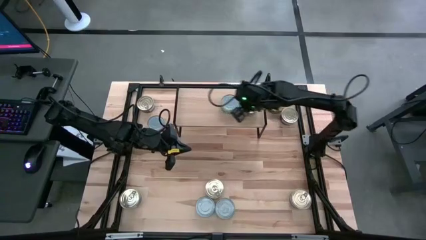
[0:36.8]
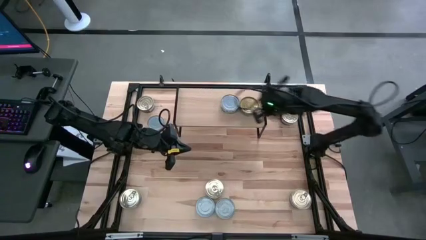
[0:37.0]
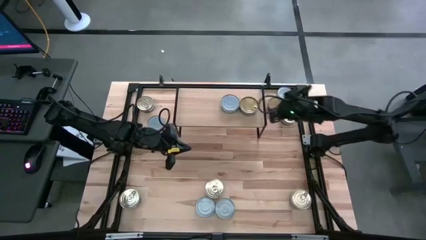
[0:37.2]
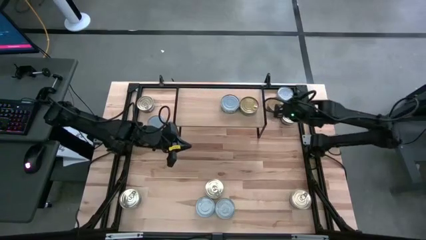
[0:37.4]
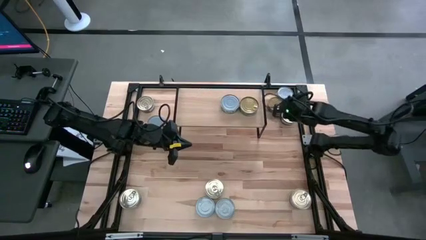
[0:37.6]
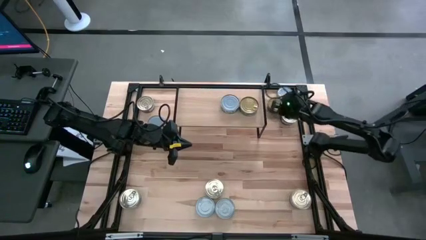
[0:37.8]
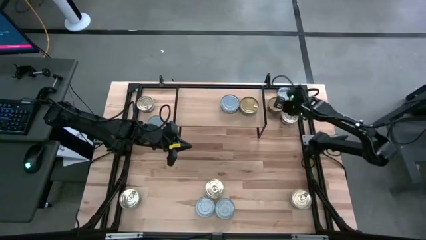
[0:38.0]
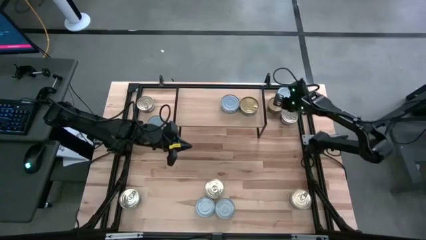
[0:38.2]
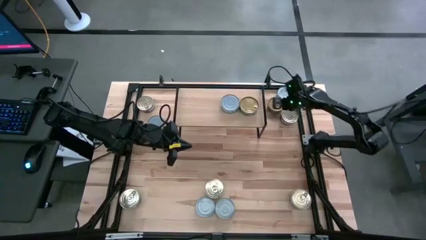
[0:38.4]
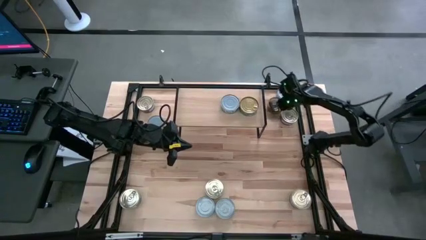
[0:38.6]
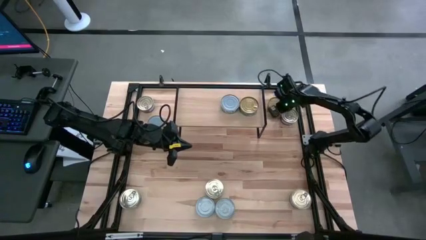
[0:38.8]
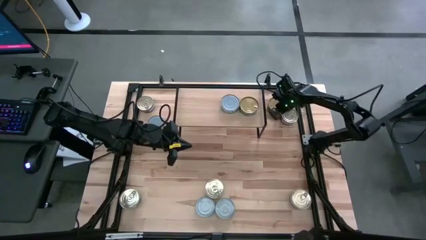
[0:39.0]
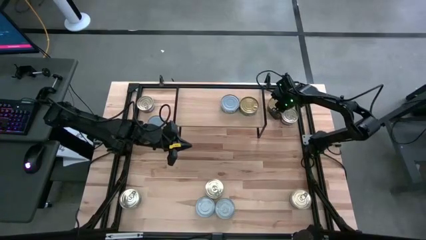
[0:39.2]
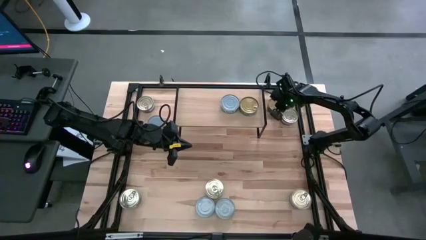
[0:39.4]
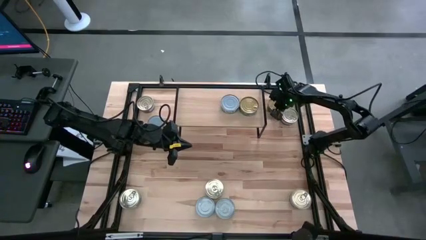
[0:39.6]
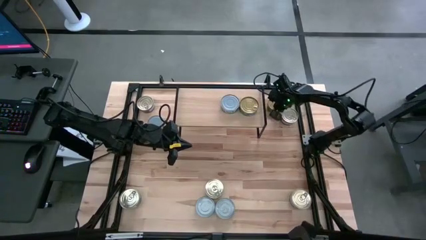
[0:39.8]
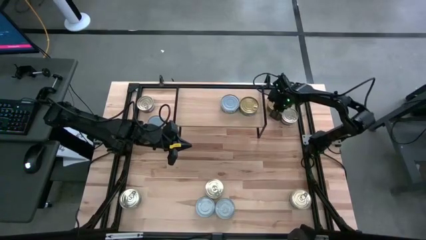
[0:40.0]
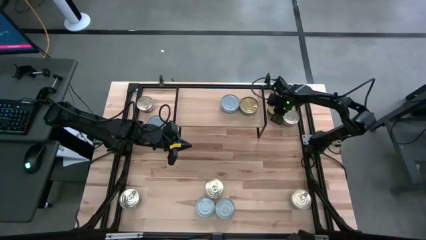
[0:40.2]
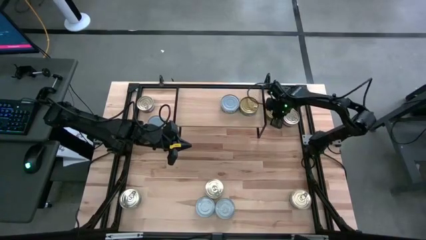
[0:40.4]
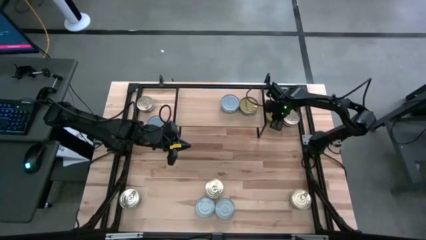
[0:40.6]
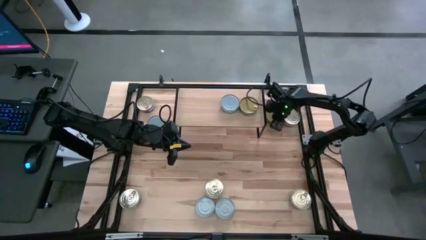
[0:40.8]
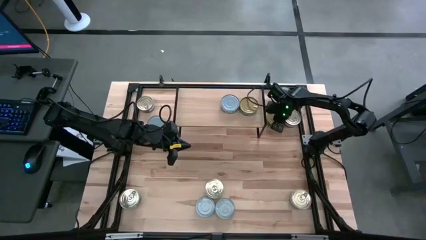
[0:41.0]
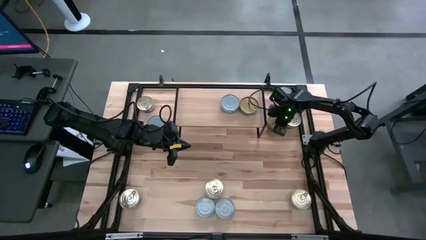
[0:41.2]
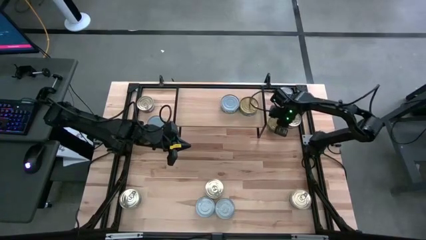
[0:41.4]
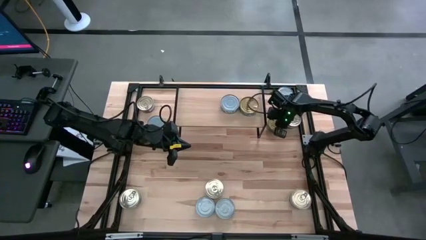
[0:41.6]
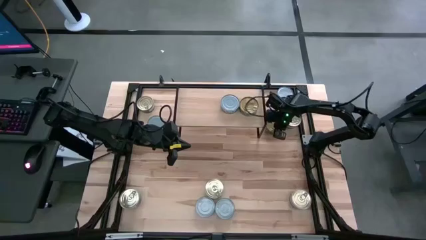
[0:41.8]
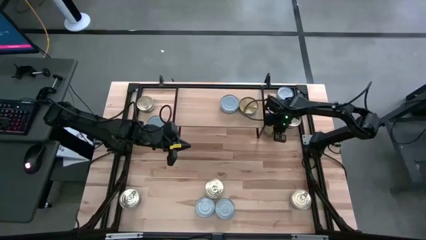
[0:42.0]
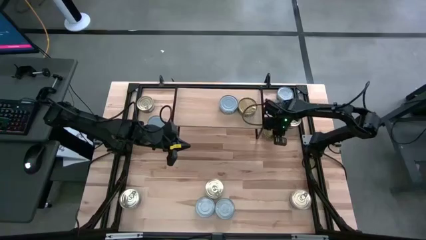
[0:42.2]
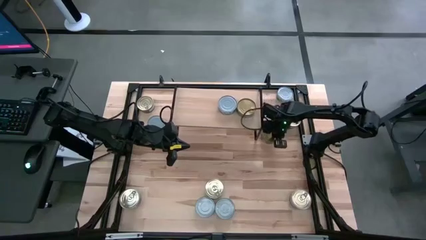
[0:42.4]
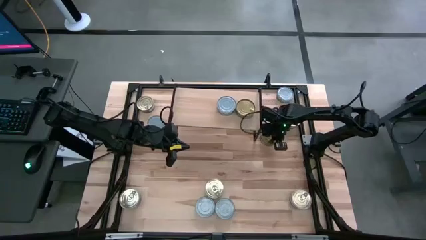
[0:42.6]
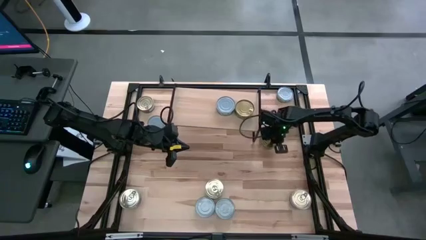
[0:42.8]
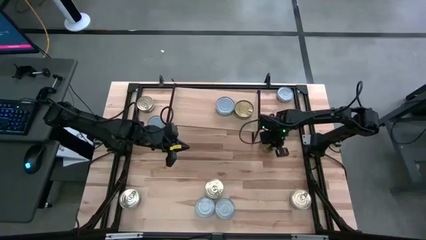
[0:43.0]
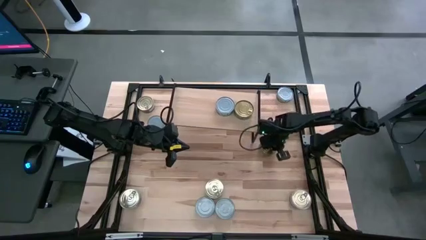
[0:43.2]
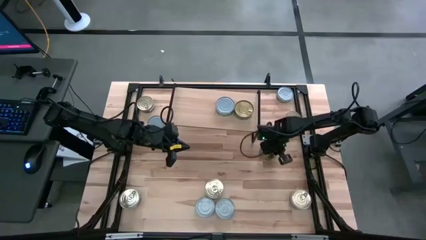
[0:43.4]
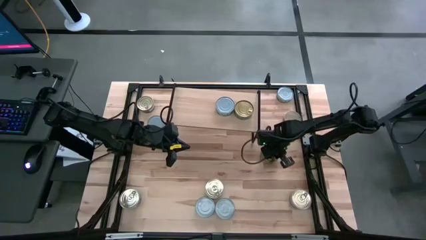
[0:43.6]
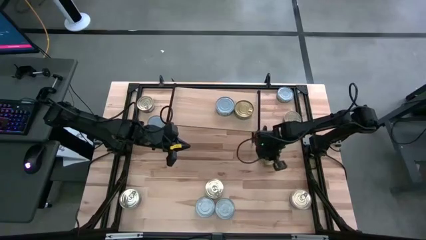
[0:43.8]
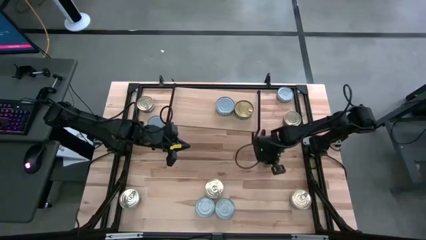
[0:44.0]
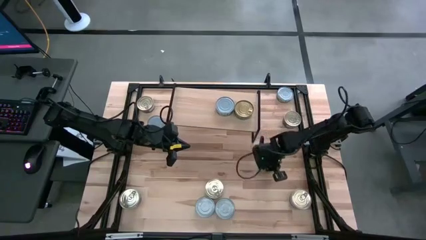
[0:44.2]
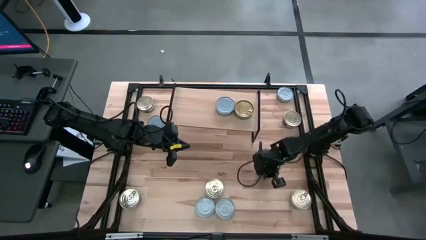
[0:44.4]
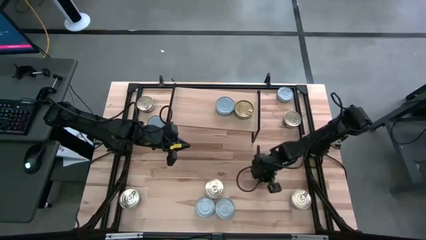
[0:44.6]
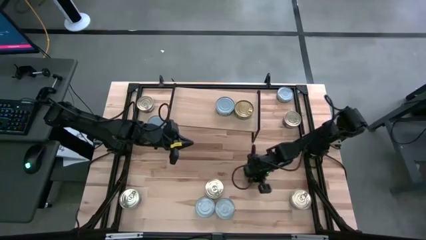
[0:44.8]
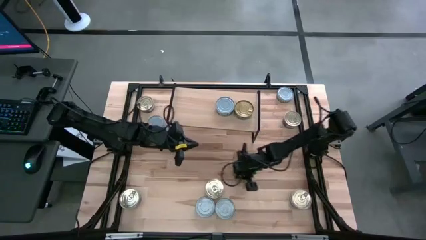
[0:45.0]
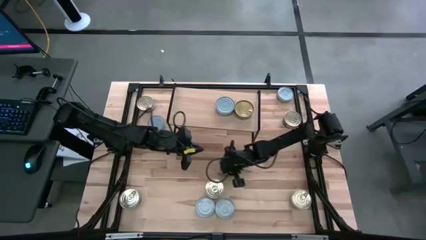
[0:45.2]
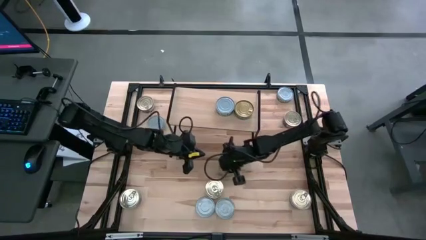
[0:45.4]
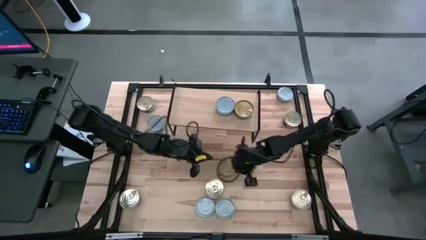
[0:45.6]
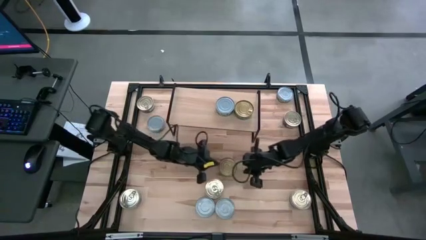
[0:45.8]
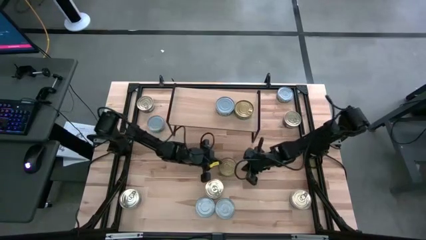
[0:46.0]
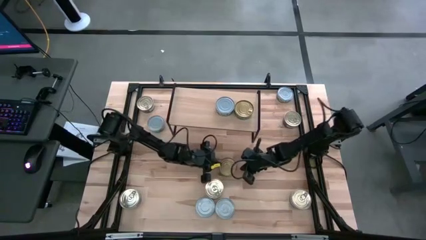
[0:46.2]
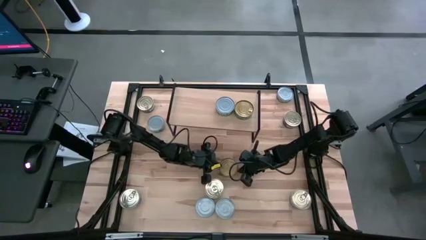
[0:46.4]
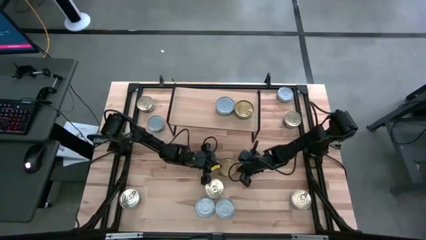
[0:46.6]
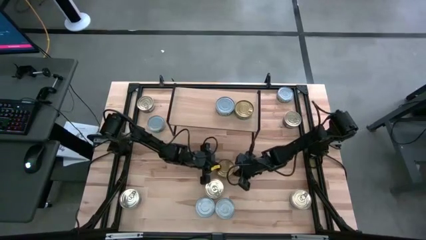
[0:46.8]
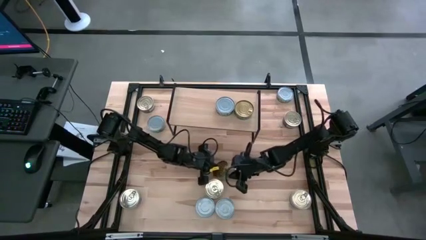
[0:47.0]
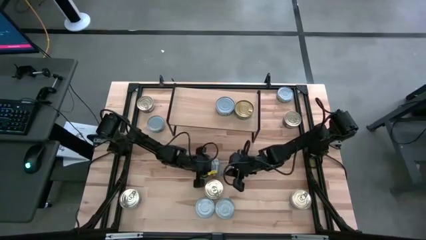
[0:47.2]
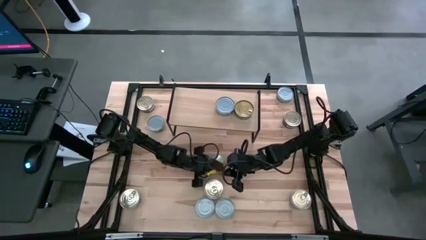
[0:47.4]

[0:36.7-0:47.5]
Task: Stack canned seafood by type on shelf
Stack the green tuna can on top of the green tuna can on the shelf

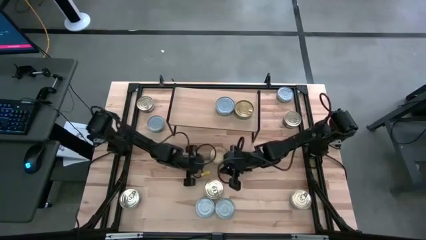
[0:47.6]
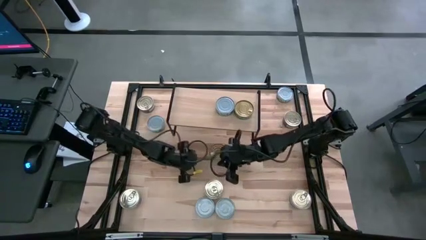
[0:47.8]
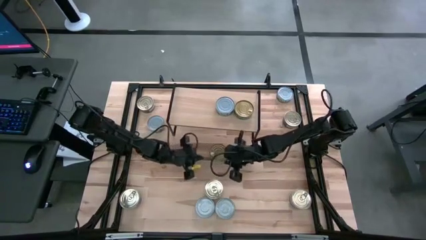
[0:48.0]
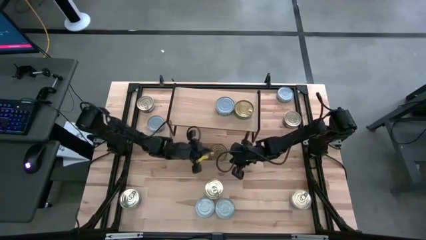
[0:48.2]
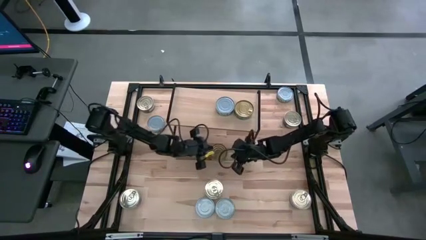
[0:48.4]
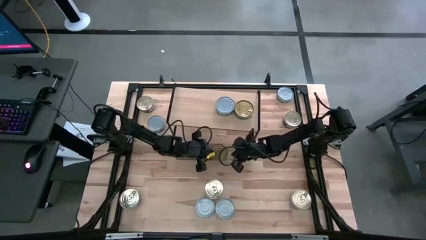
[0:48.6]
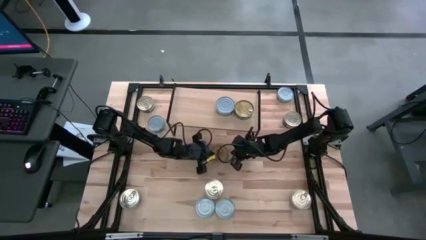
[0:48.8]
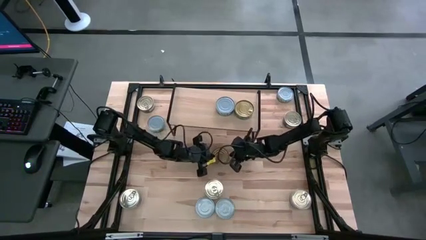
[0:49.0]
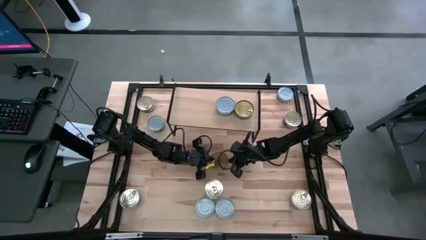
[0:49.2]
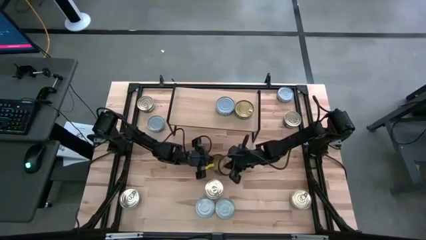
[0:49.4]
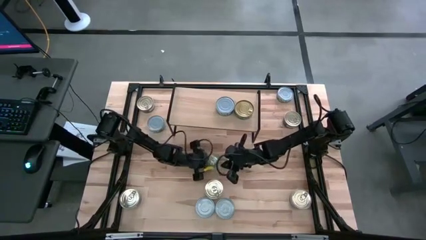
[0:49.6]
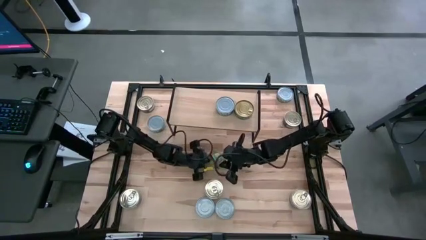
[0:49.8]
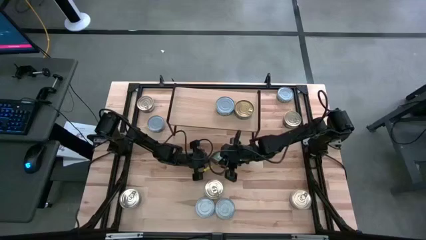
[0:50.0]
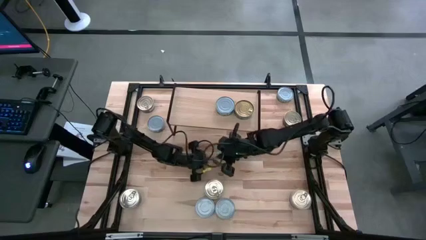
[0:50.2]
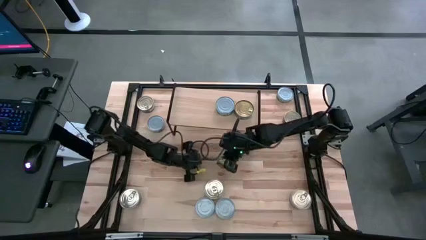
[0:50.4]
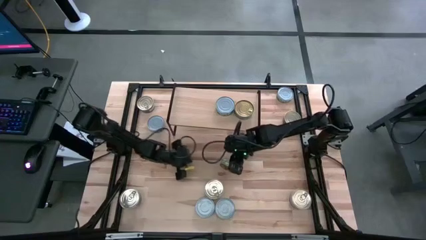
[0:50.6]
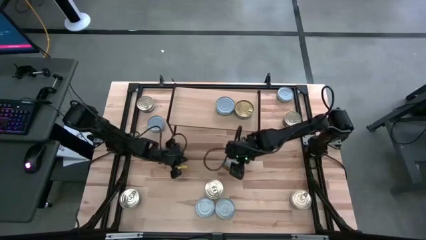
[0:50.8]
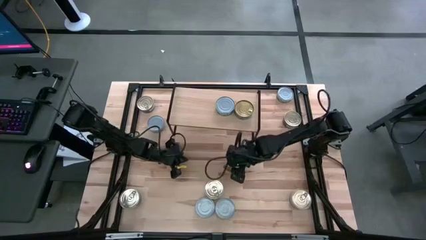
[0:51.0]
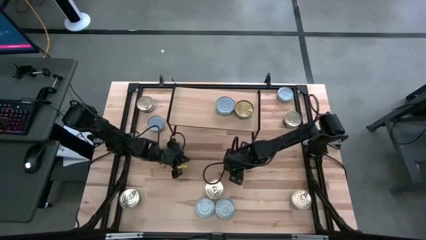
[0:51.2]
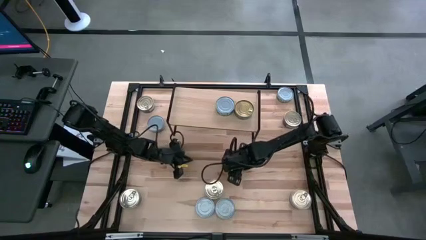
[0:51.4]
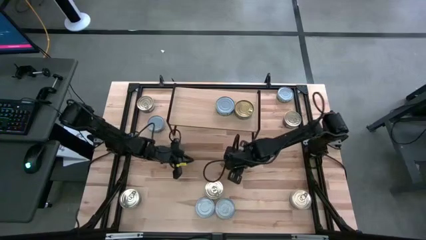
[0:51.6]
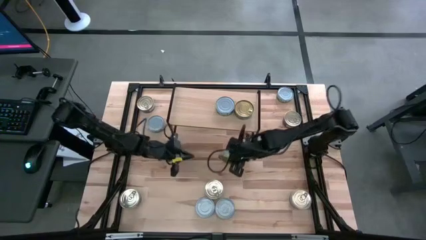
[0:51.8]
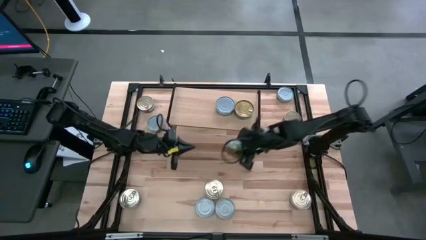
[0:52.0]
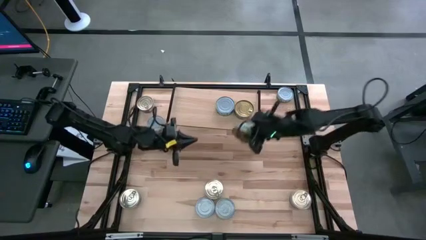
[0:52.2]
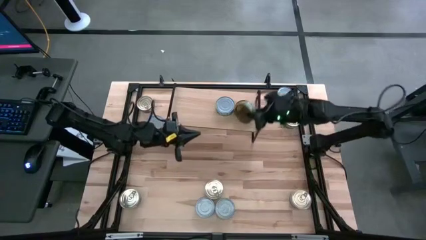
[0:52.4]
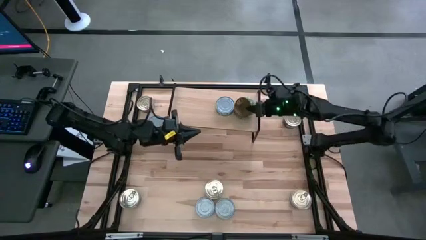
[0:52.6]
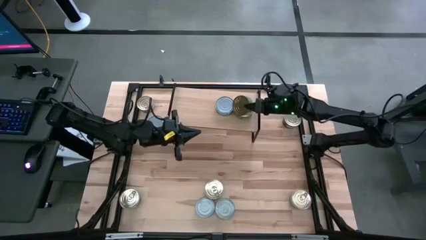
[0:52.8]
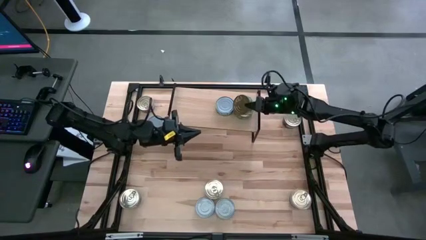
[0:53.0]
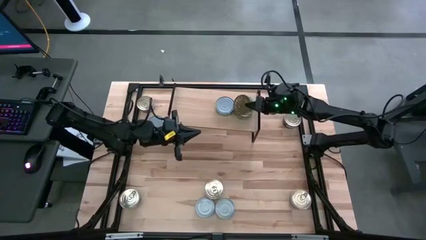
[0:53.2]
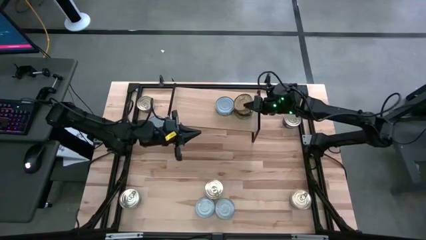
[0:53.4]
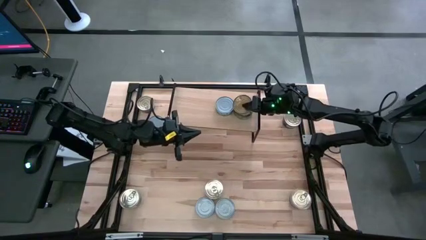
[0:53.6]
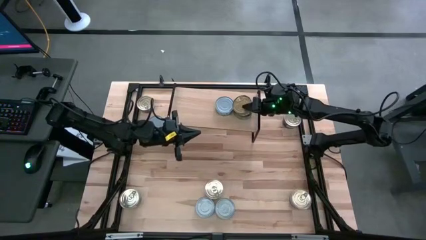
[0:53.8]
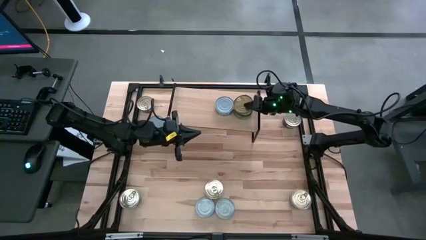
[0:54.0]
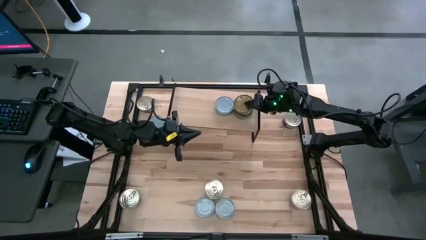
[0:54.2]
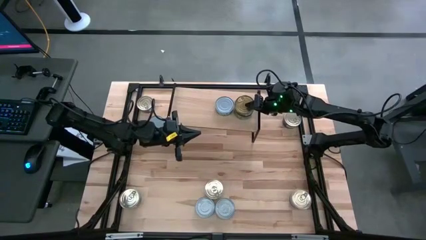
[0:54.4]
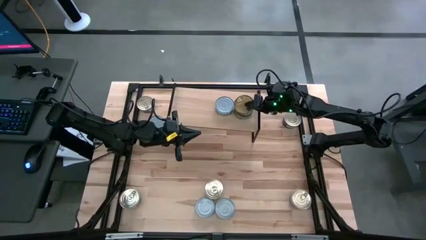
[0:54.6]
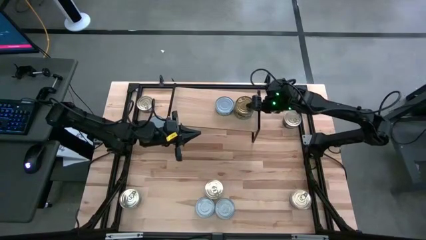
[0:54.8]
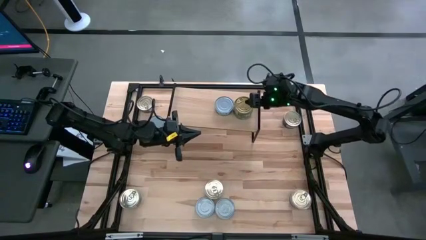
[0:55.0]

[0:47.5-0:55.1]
Stack the green tuna can on top of the green tuna can on the shelf
